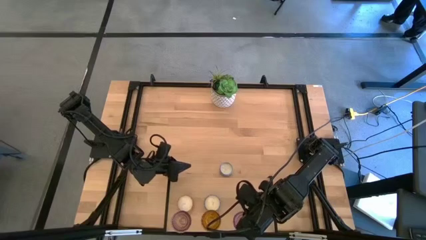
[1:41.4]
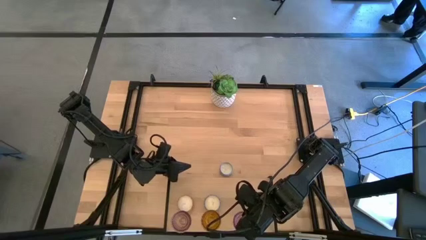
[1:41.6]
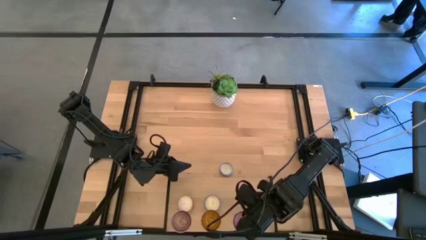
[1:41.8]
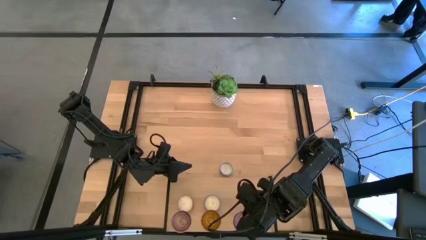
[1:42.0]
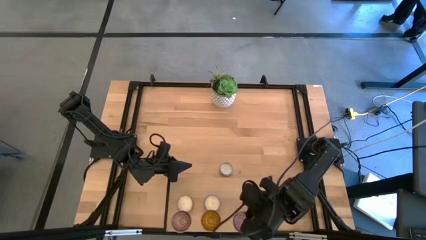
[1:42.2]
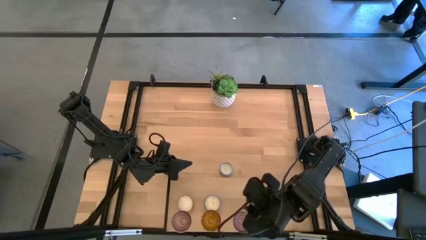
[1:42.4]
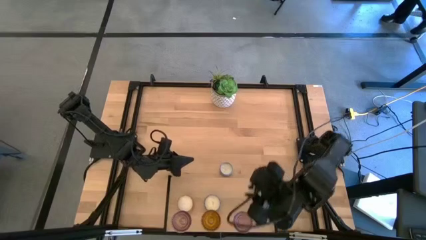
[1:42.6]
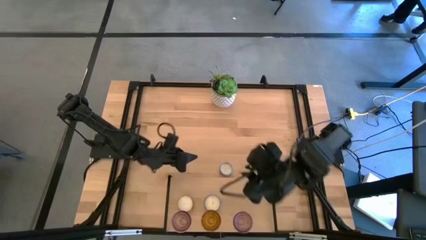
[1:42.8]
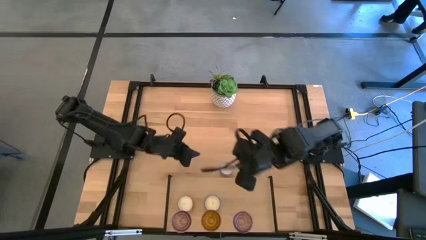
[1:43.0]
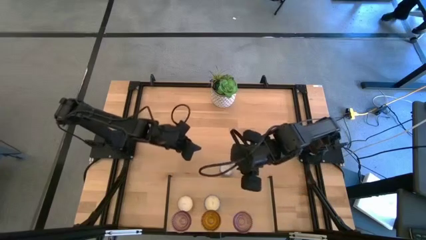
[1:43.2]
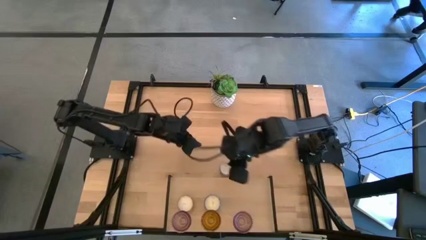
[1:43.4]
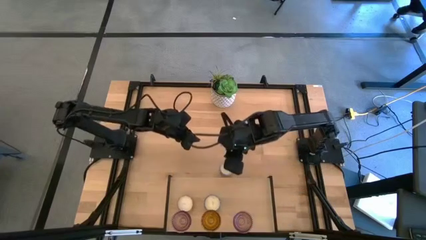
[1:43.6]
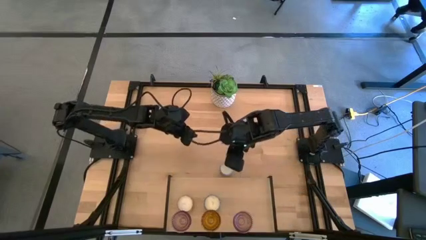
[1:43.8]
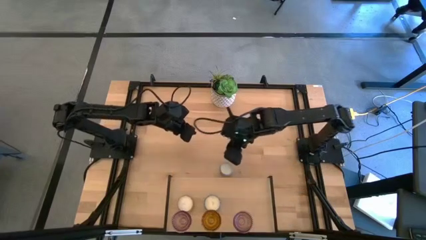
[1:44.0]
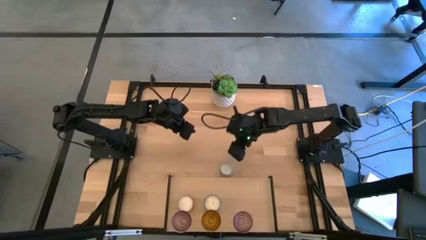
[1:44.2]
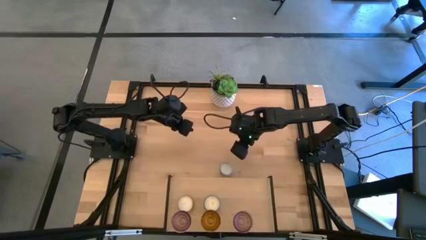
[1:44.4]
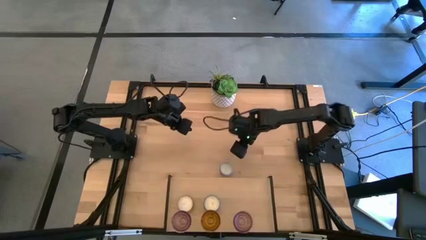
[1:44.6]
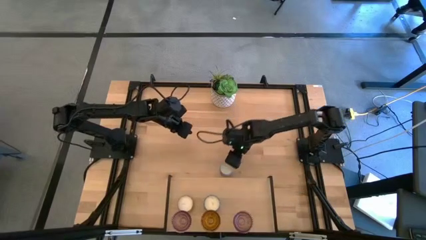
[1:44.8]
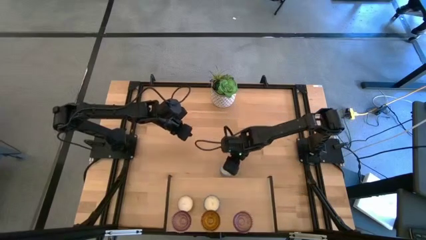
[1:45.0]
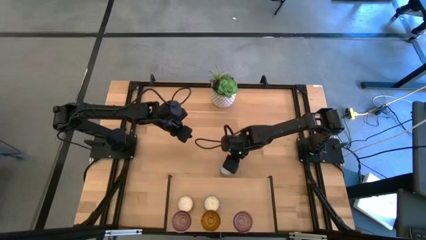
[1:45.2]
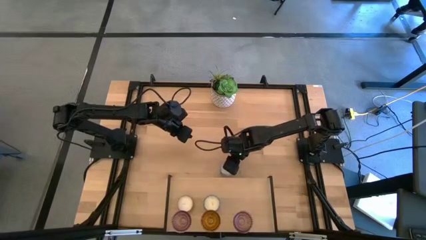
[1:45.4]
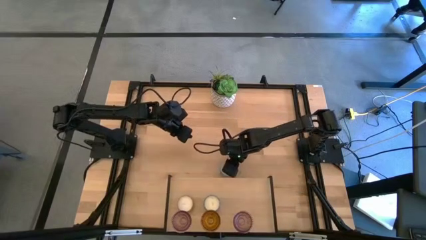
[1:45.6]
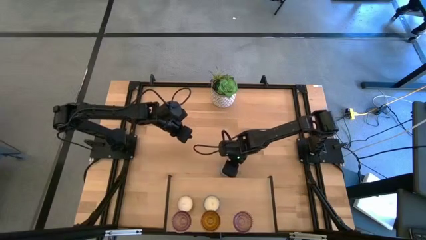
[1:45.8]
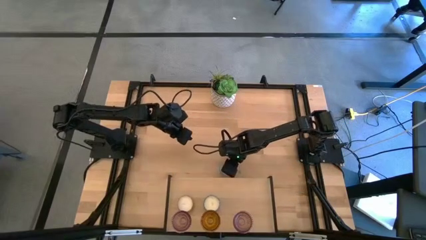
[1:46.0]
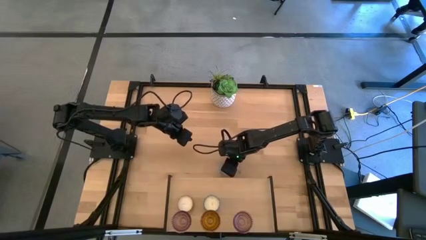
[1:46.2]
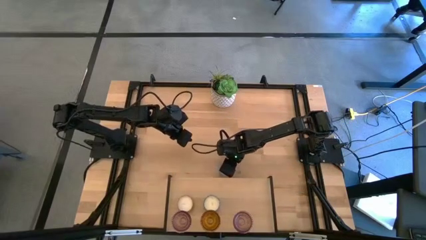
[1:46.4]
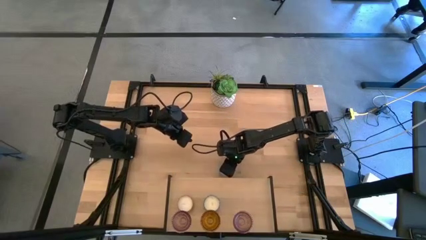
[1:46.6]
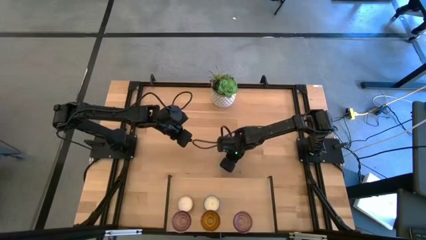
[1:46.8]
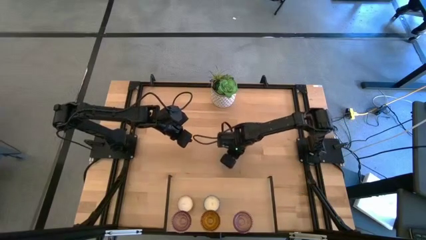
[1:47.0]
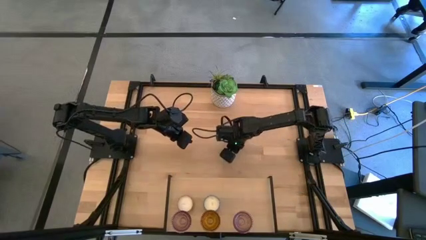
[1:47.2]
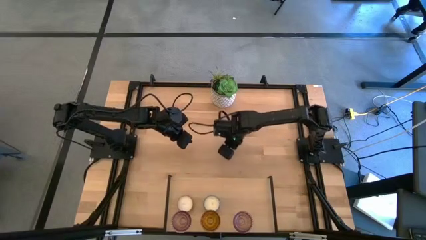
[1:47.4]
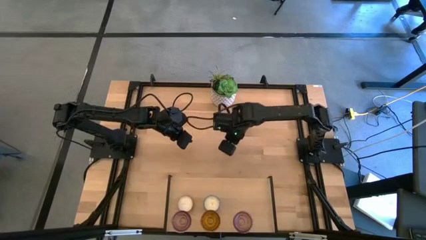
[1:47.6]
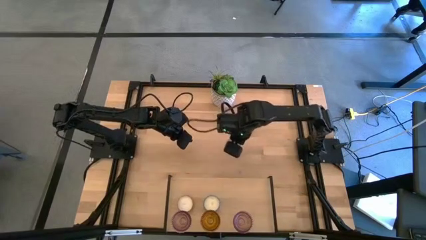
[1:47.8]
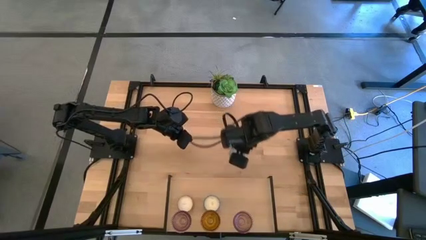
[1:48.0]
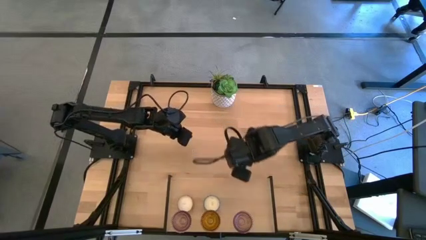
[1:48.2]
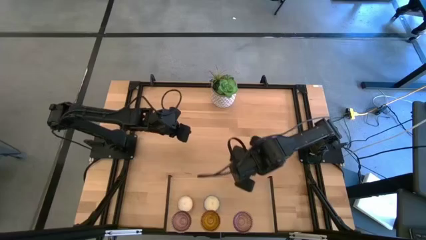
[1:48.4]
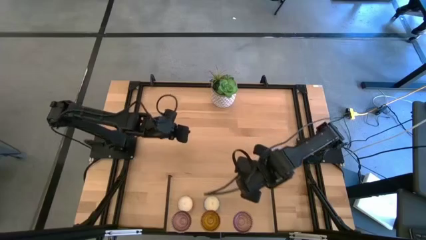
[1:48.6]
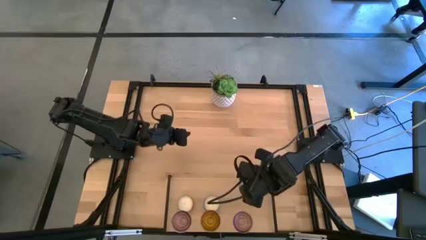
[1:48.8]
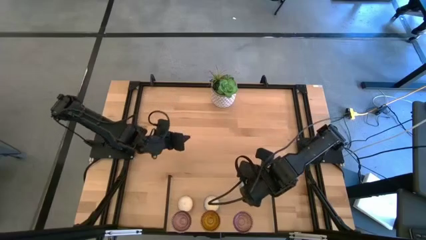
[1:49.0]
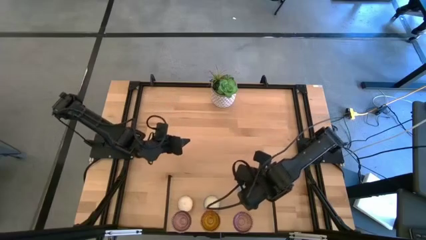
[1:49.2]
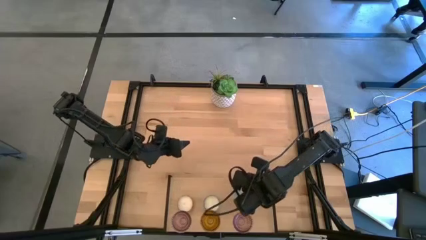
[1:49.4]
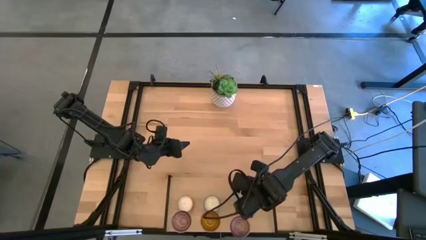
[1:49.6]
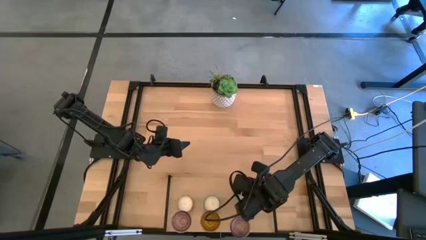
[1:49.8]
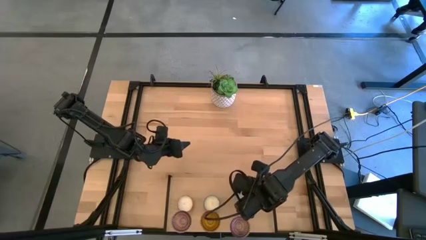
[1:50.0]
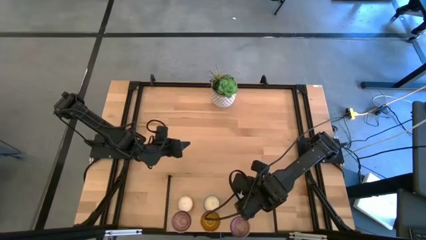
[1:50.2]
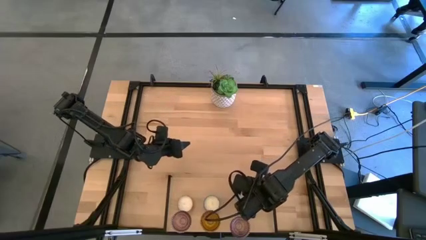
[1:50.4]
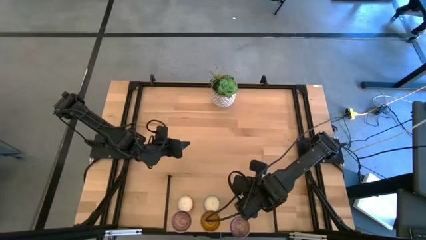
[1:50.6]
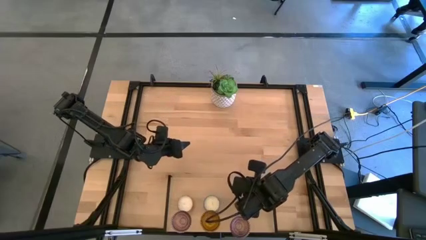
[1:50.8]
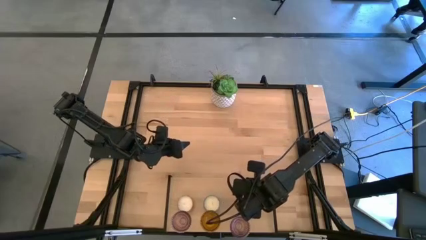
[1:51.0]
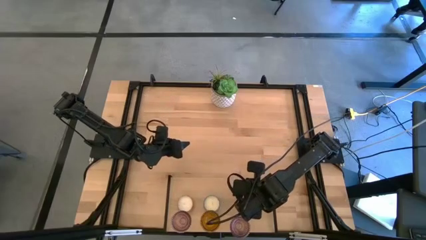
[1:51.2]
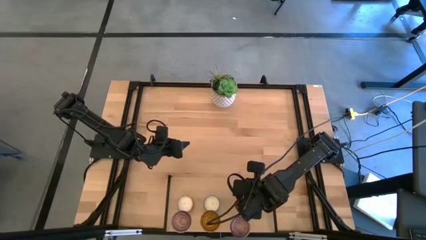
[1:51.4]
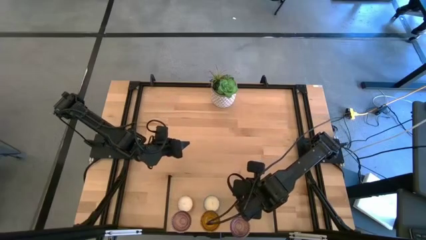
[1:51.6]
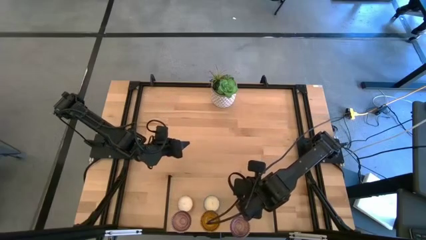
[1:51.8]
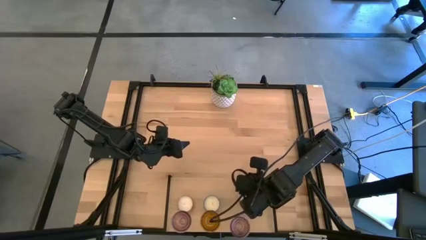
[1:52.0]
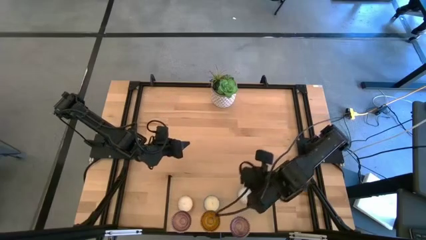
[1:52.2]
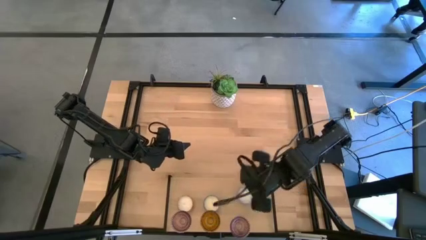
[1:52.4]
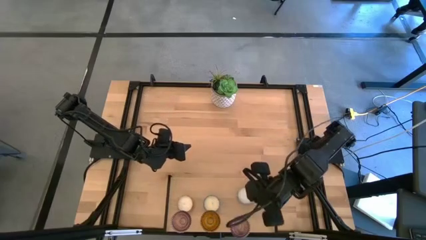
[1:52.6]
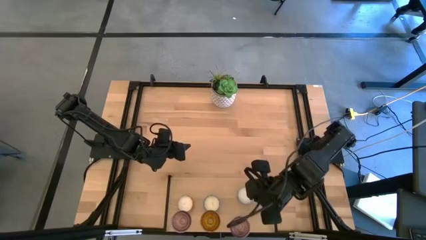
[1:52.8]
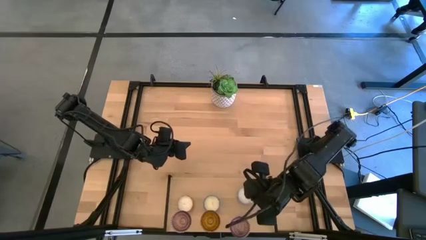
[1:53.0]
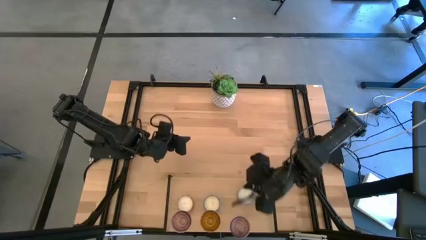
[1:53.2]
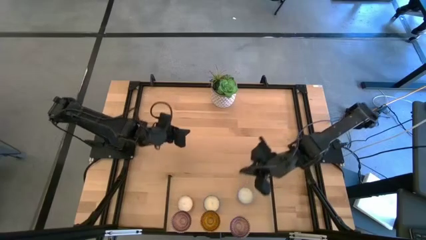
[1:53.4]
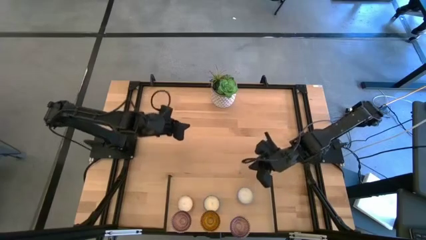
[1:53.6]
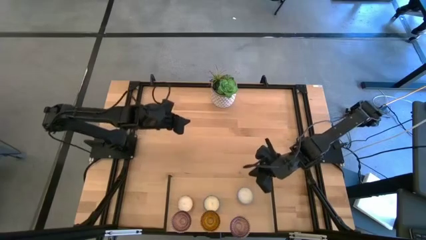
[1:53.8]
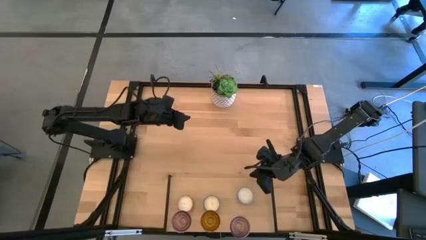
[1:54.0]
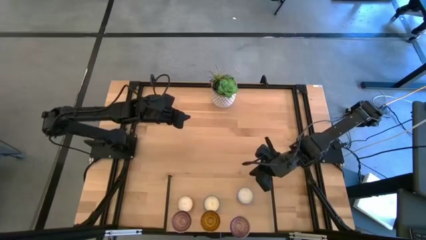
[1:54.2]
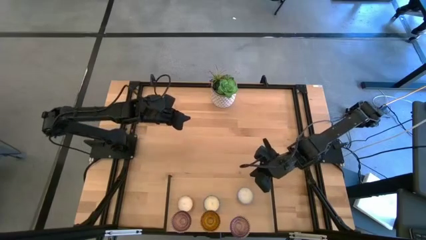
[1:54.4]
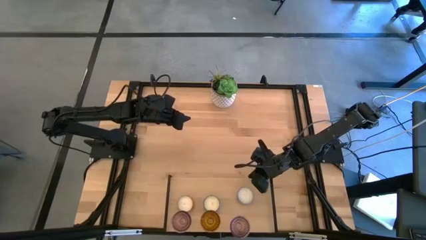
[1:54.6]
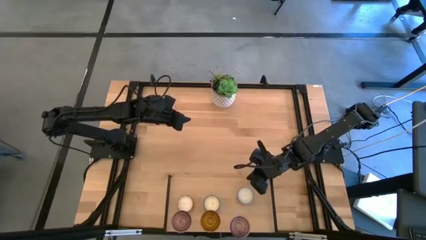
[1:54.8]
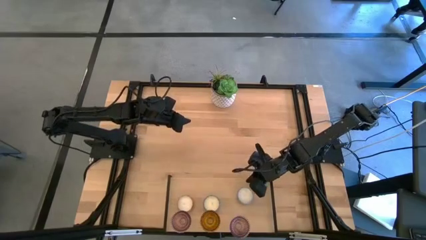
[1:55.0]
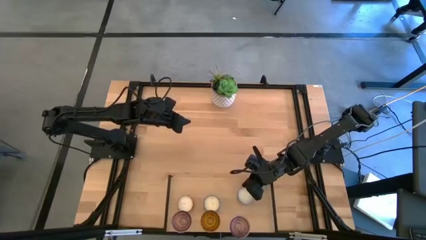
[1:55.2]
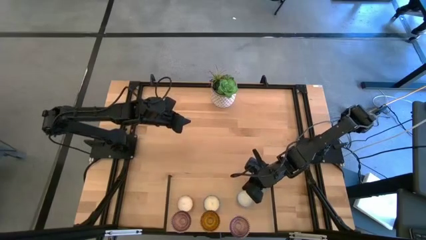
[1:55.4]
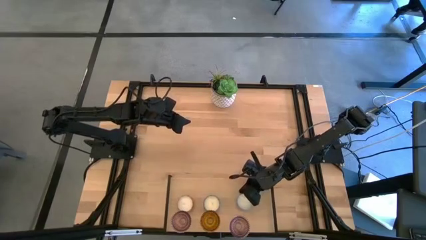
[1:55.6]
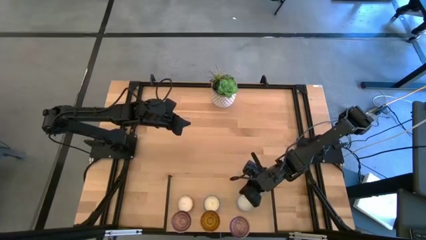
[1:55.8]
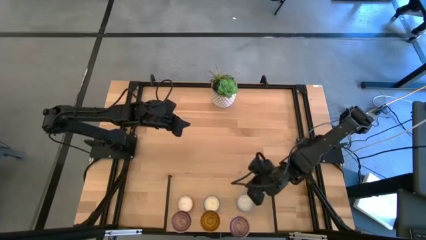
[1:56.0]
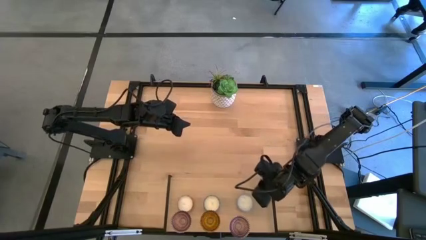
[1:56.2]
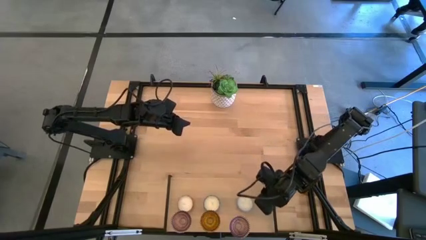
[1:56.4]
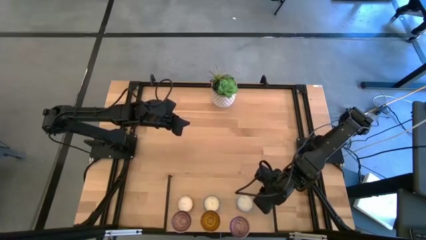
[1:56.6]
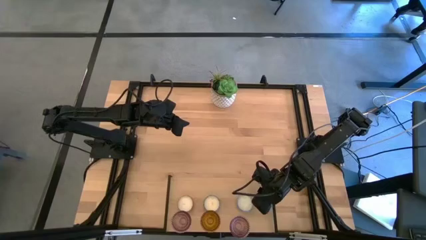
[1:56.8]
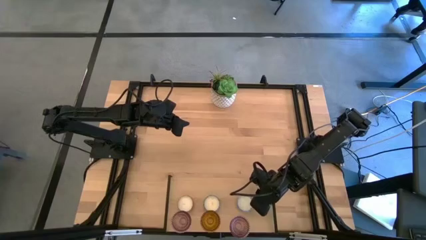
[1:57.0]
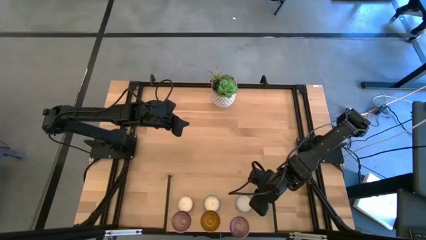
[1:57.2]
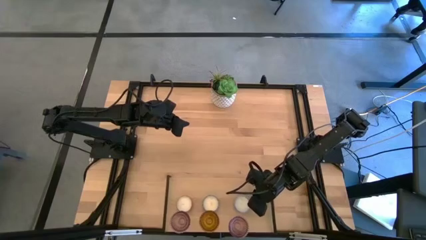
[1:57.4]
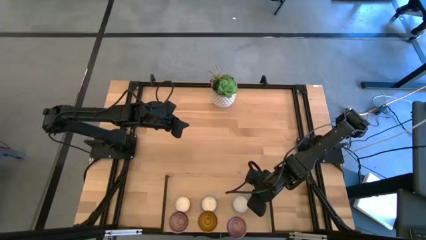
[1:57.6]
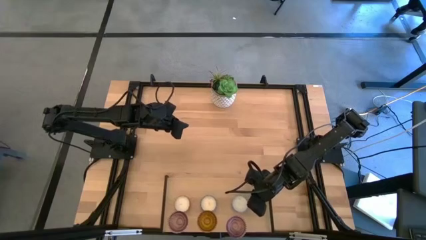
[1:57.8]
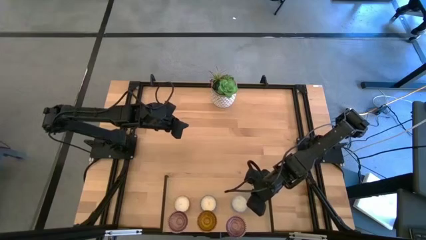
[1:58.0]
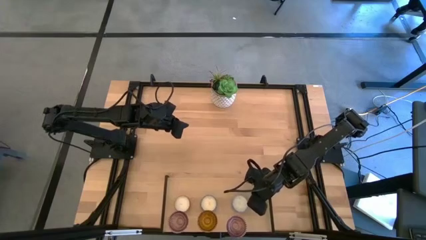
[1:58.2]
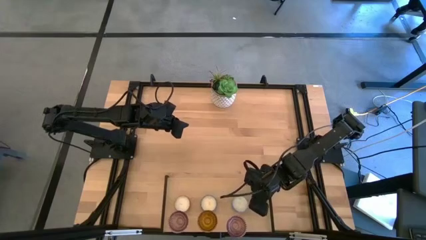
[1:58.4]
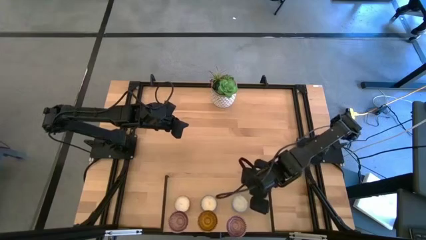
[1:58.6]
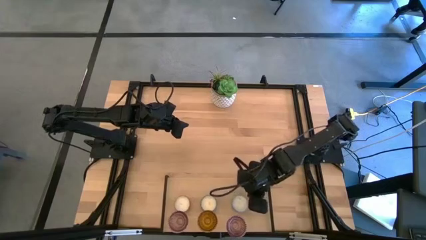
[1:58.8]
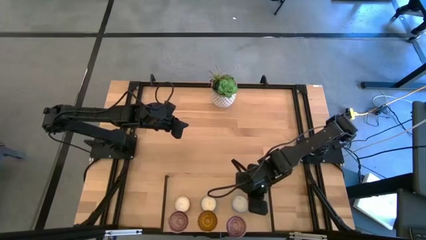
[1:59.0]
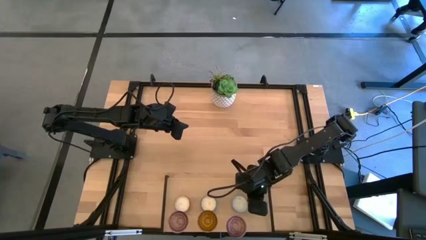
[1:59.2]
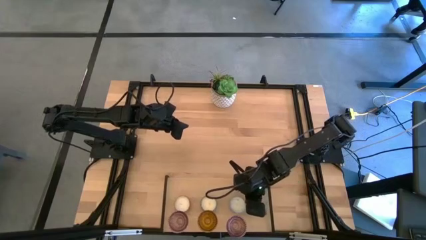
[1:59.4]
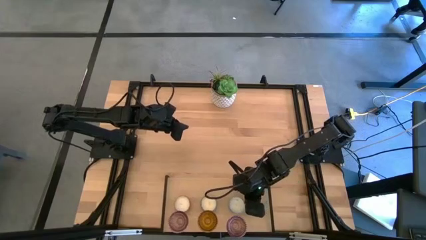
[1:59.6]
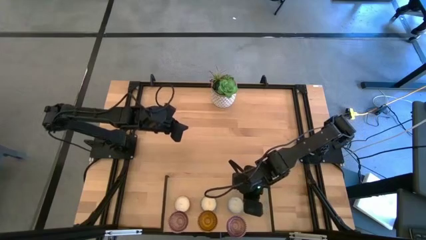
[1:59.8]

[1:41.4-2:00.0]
Task: Pick & Place candle stick holders
Put the light blue scented candle on the shelf
